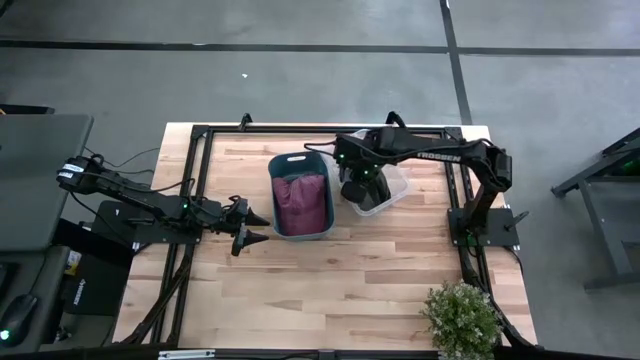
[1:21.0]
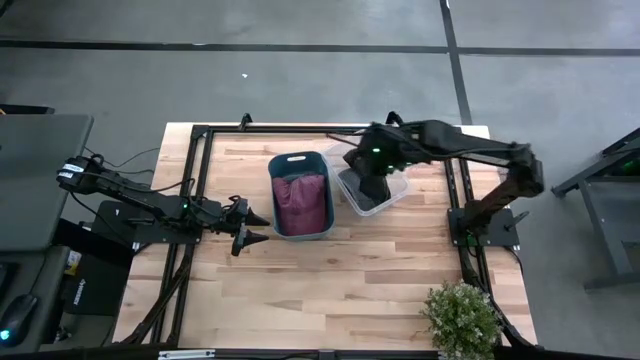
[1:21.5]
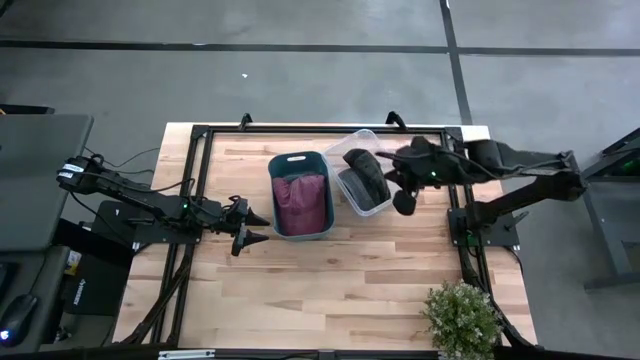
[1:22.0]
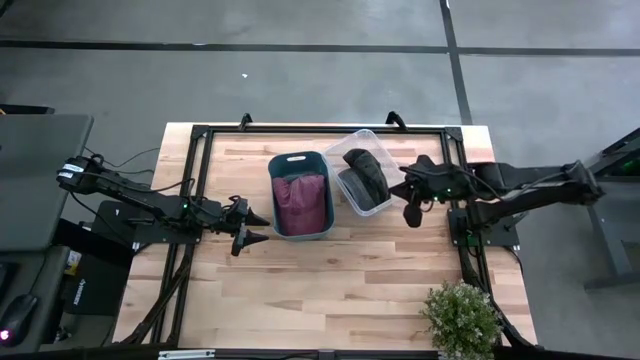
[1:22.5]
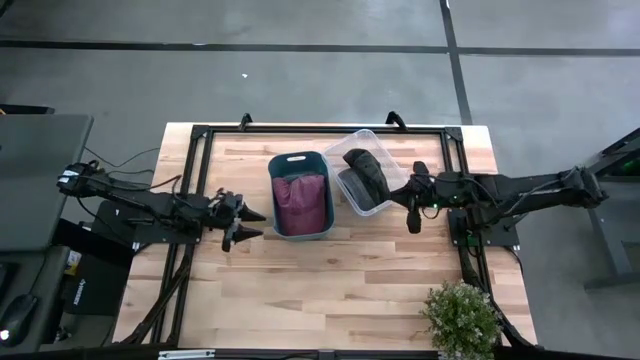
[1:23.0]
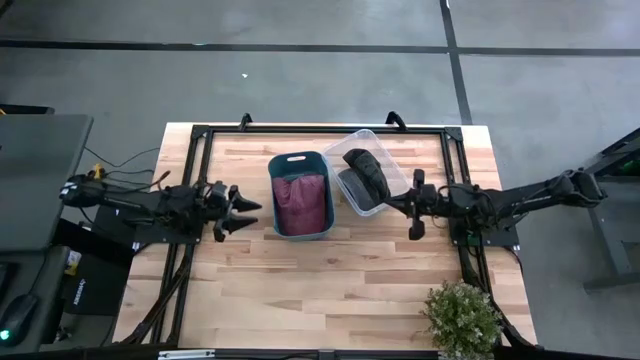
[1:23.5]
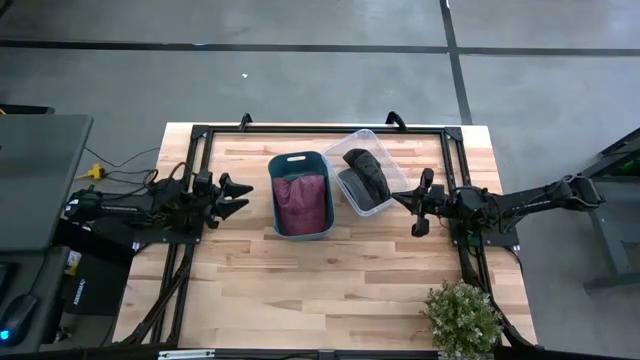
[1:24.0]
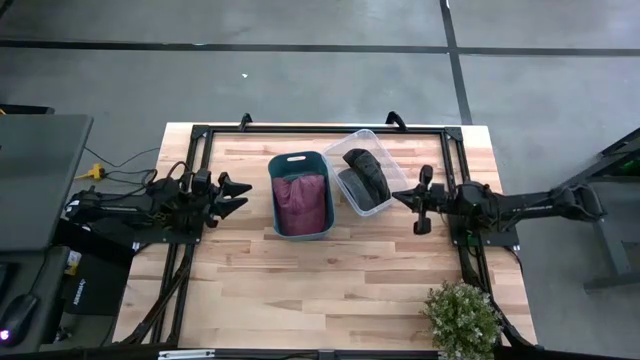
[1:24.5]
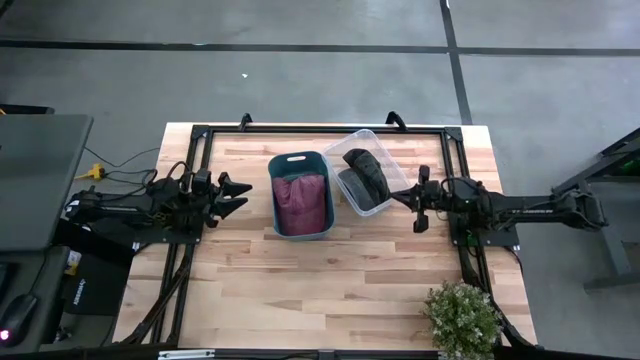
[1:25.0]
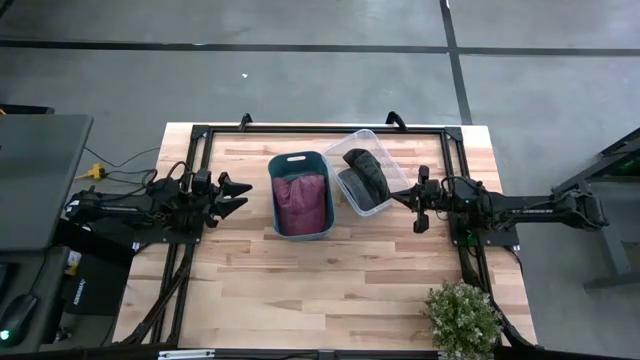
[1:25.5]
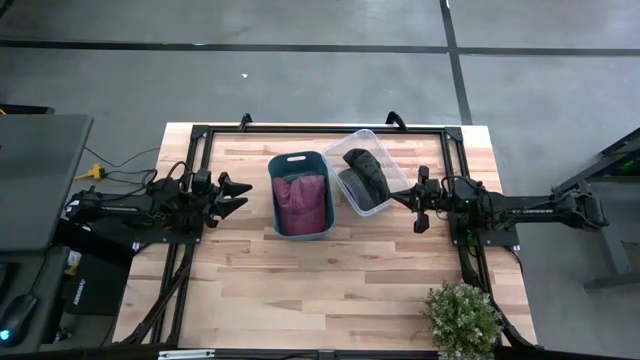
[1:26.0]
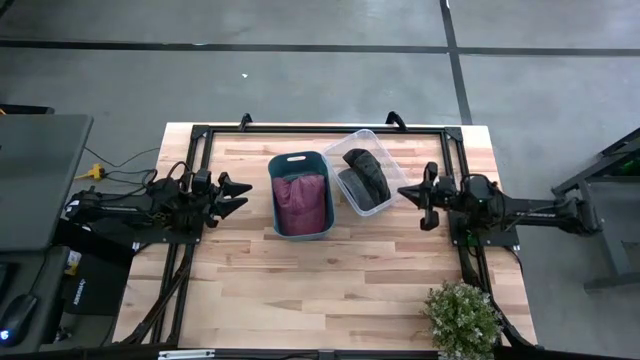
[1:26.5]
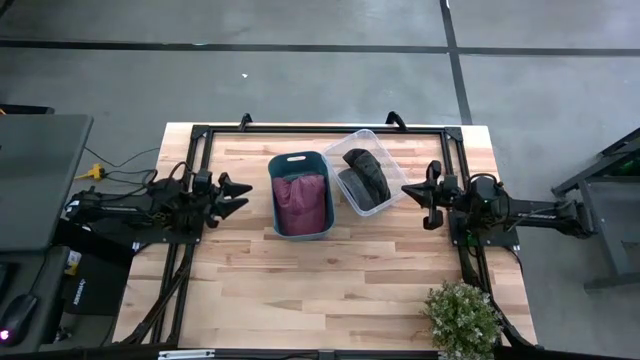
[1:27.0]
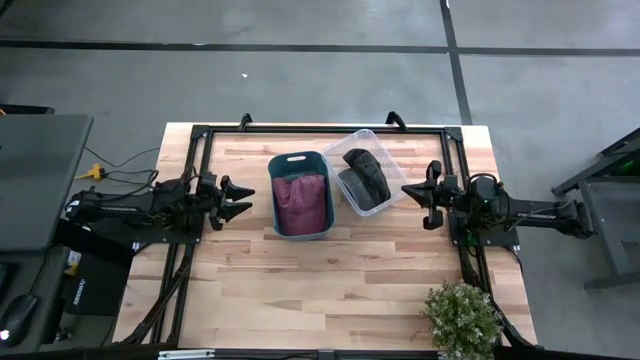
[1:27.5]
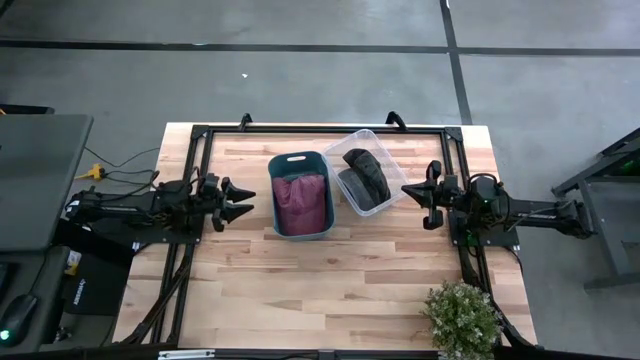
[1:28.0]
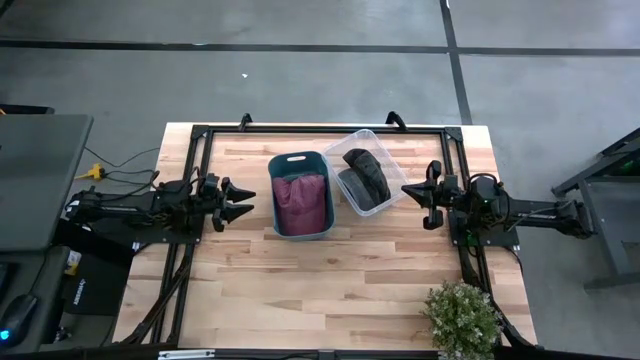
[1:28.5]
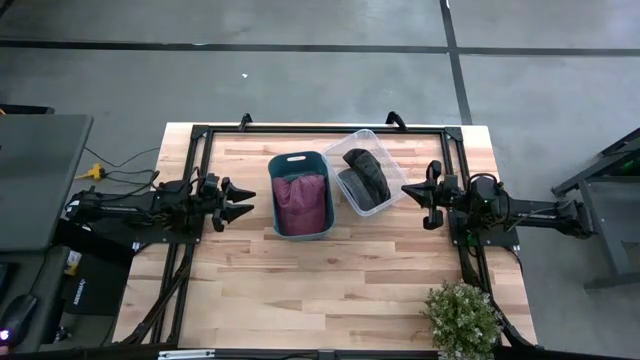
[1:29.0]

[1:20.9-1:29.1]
Task: Pick & Place hat
Return to Home Position

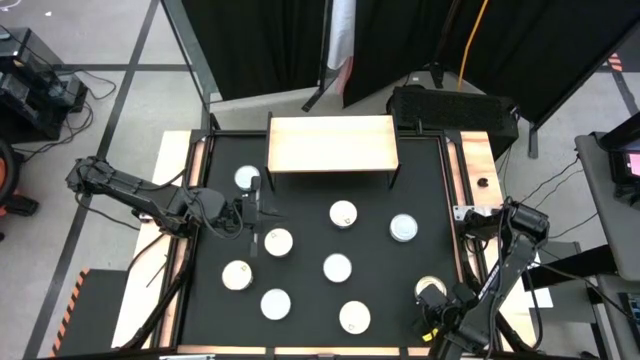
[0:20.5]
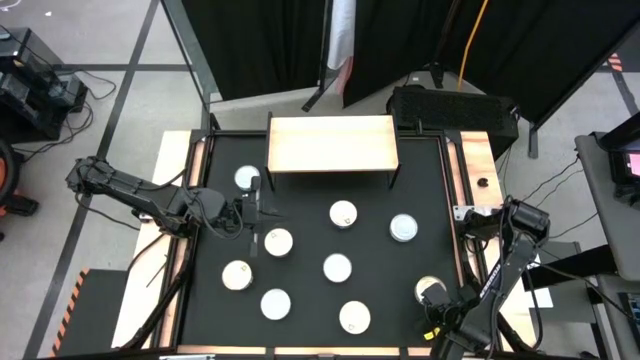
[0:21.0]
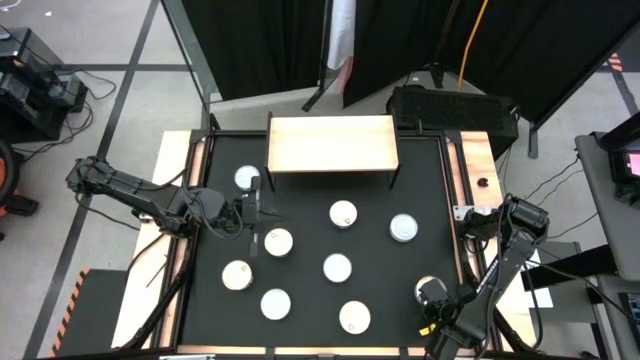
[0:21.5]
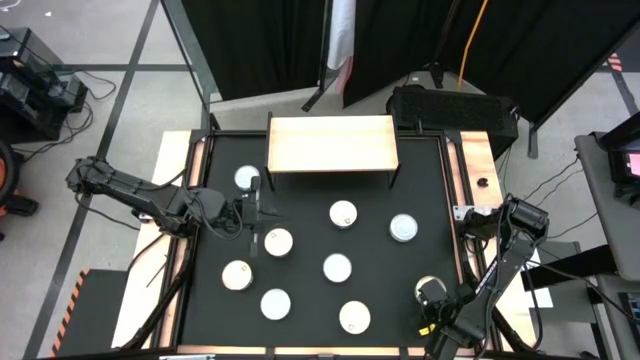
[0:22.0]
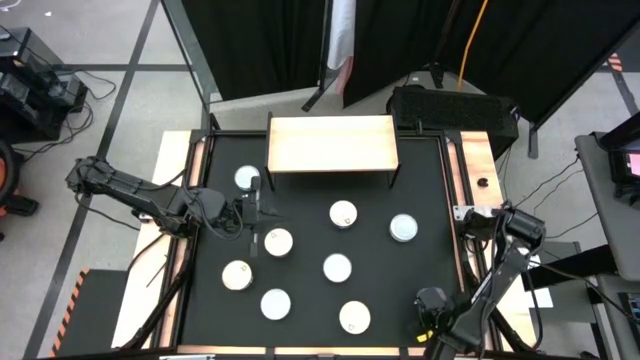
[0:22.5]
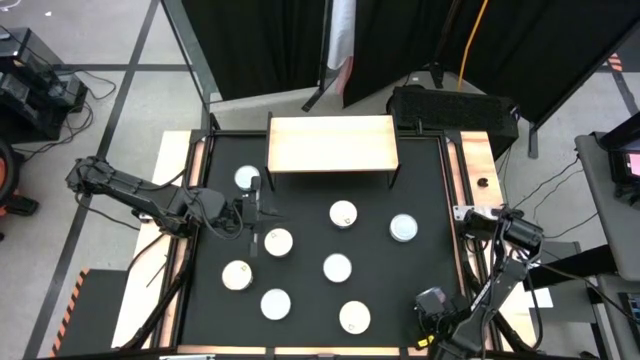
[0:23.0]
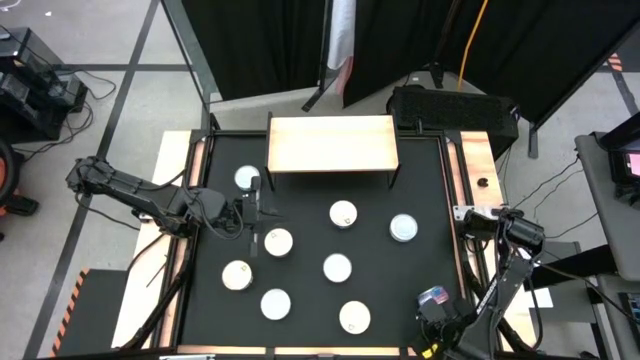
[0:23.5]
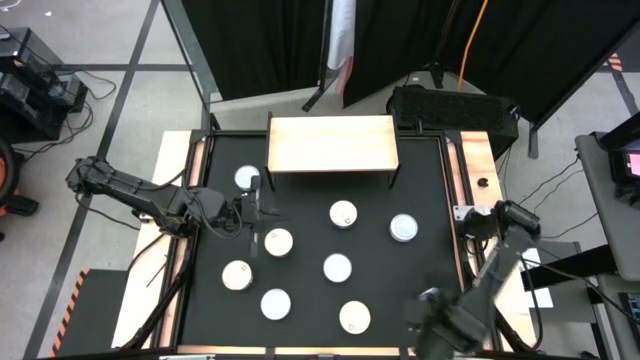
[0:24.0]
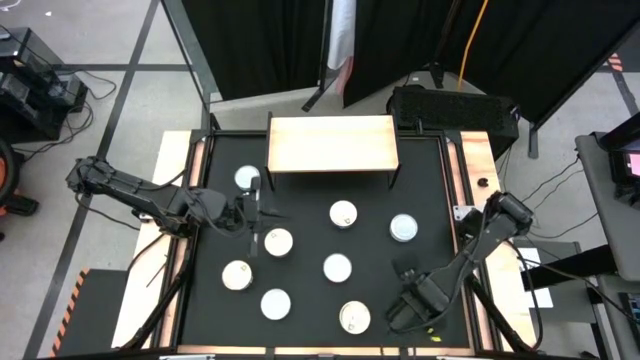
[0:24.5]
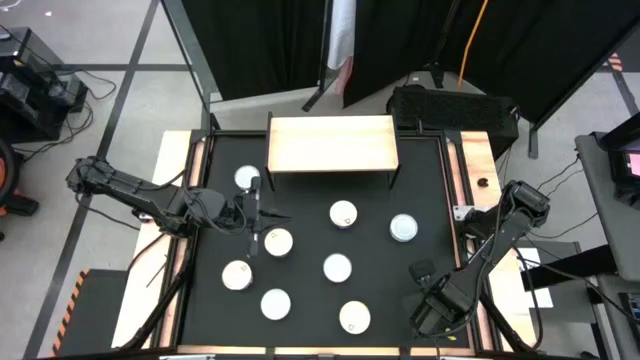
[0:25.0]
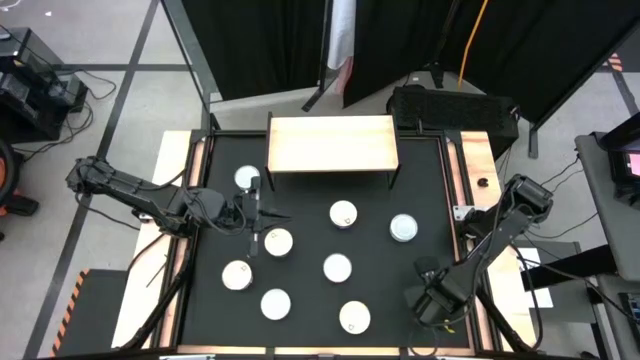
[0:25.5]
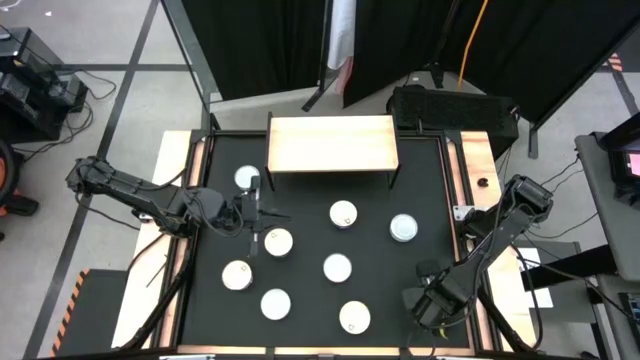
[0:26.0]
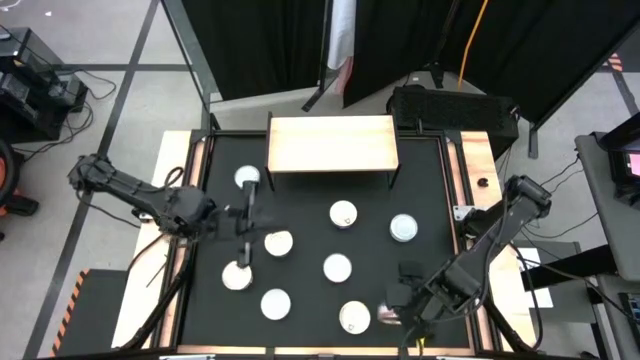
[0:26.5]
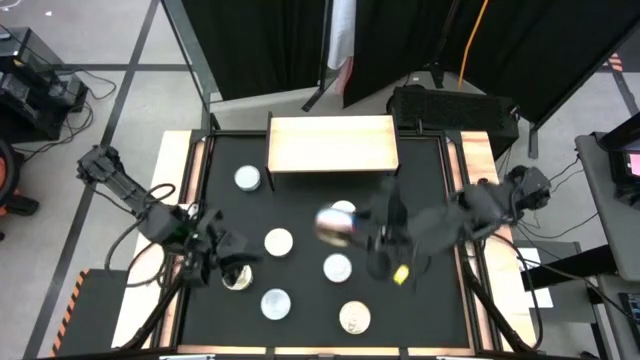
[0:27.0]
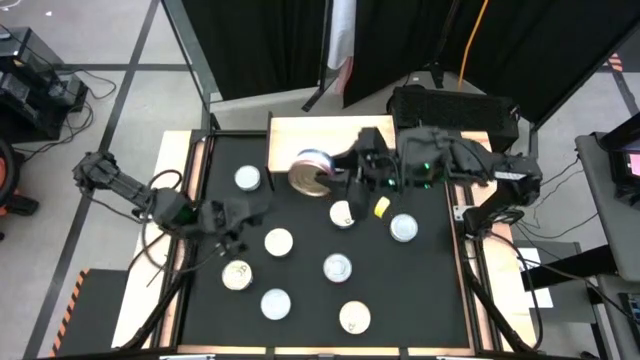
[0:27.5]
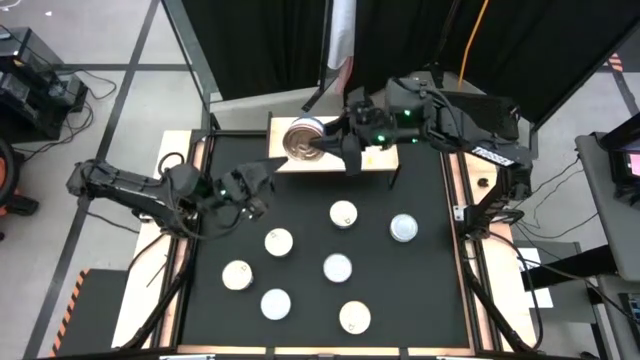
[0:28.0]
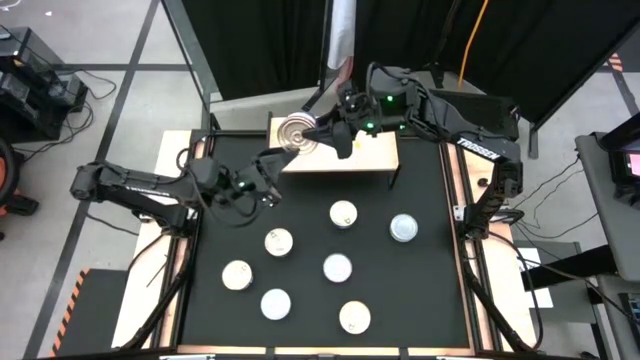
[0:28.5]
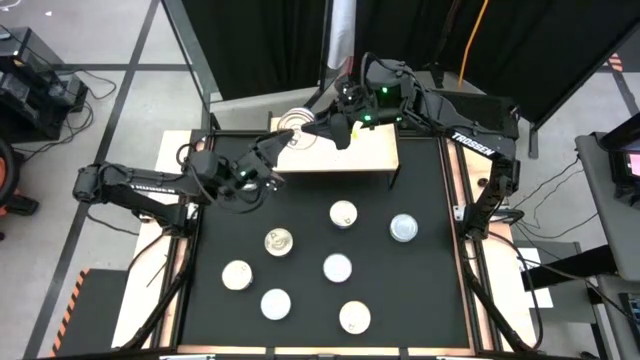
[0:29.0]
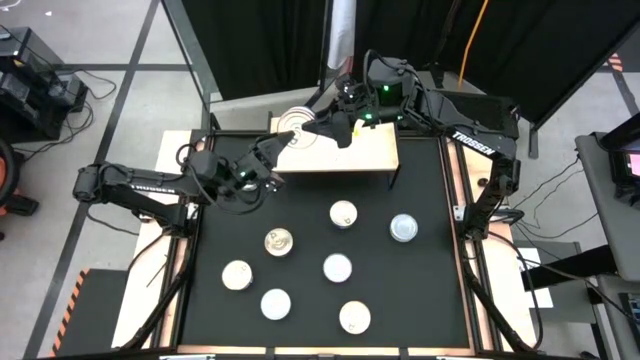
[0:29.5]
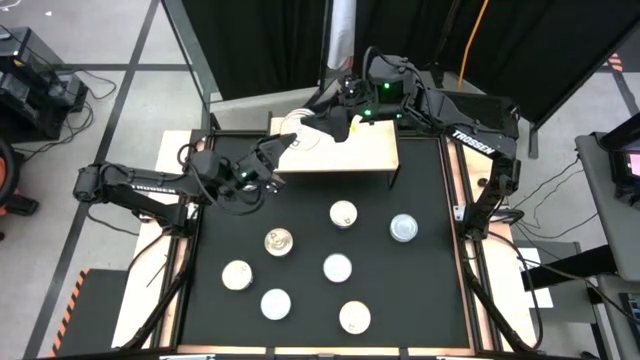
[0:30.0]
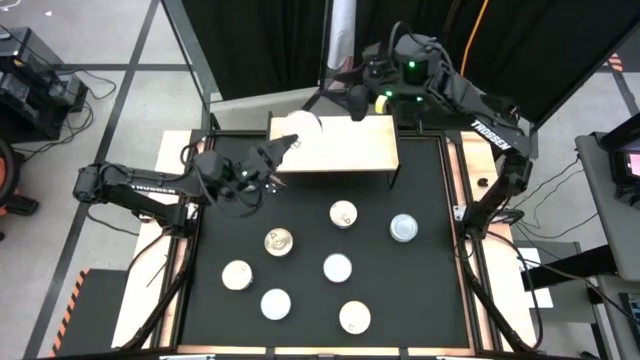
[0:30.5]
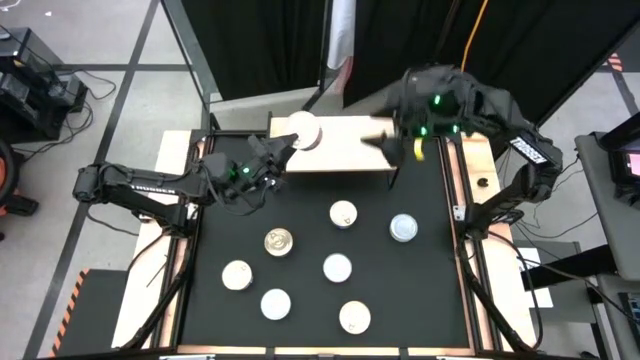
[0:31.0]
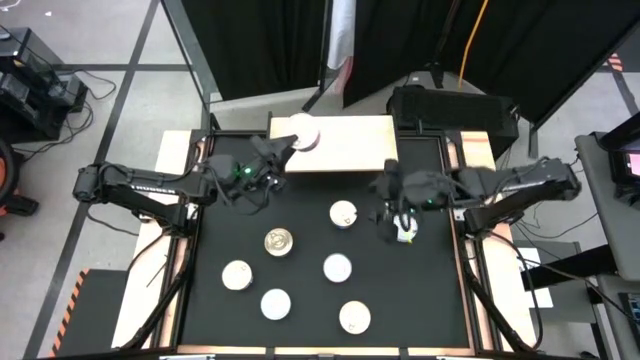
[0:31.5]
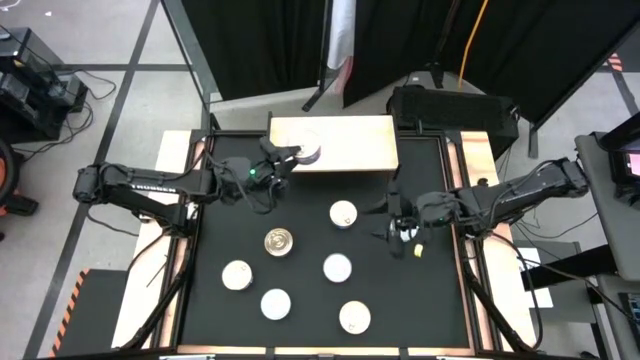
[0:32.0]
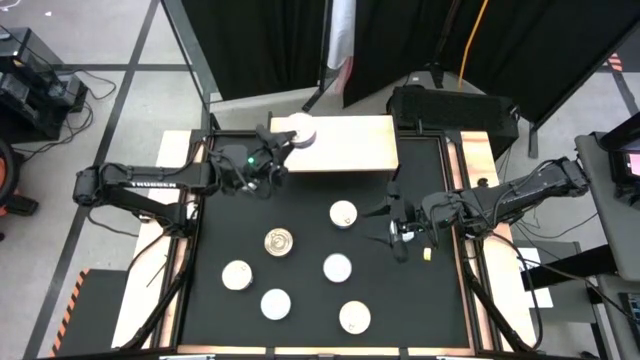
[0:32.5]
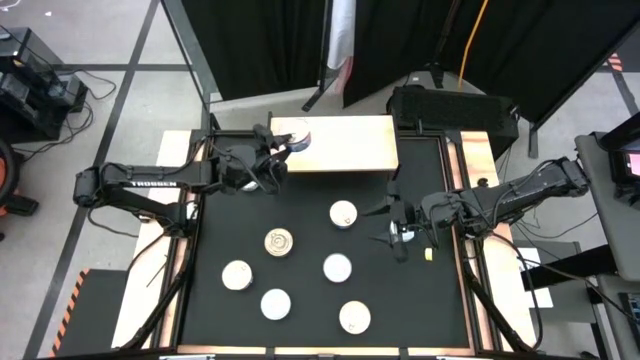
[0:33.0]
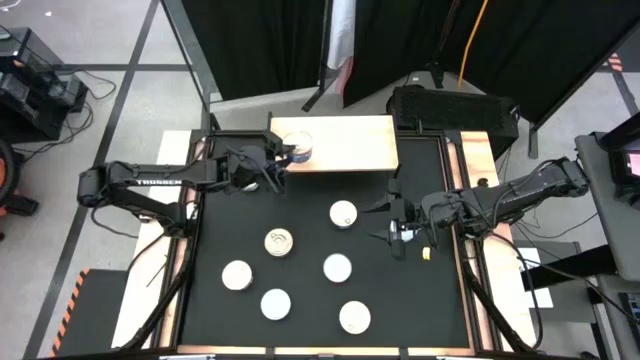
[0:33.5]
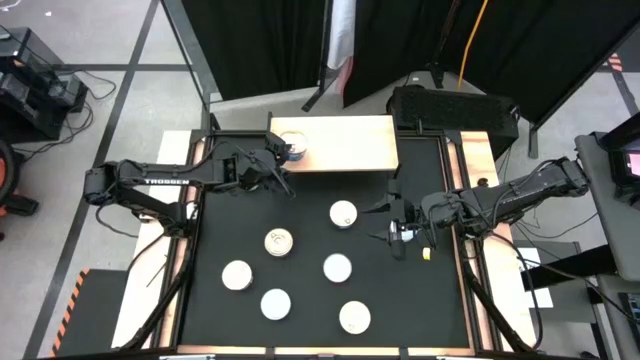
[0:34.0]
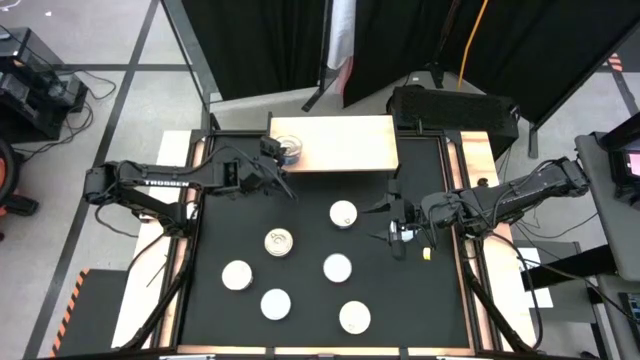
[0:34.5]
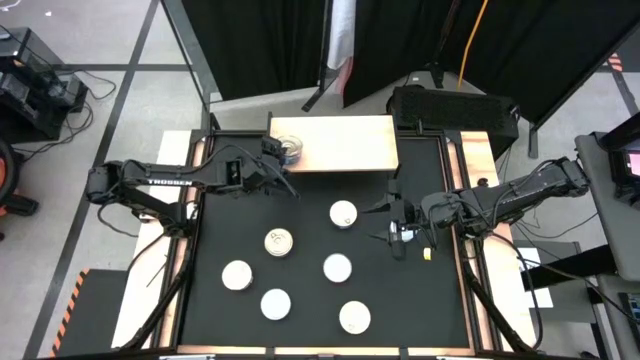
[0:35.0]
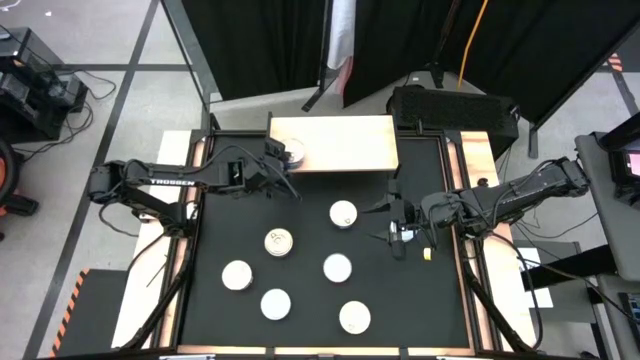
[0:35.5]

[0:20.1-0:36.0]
Task: Stack canned seafood by type on shelf
Put the blue pink tuna can on the shelf
